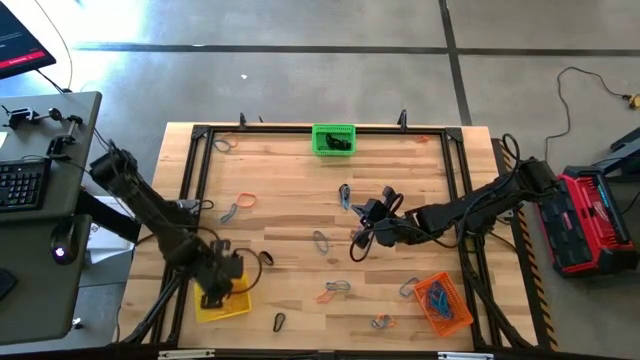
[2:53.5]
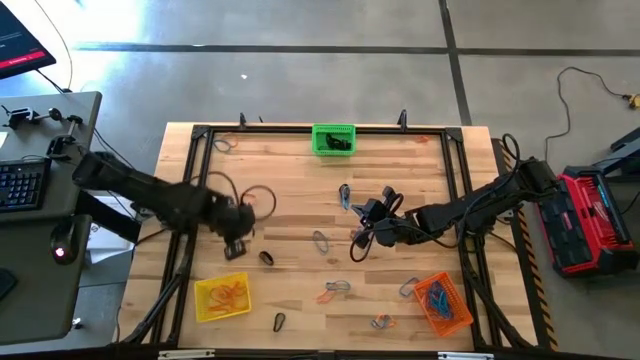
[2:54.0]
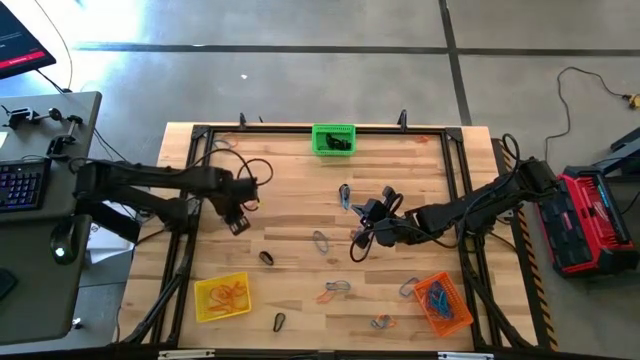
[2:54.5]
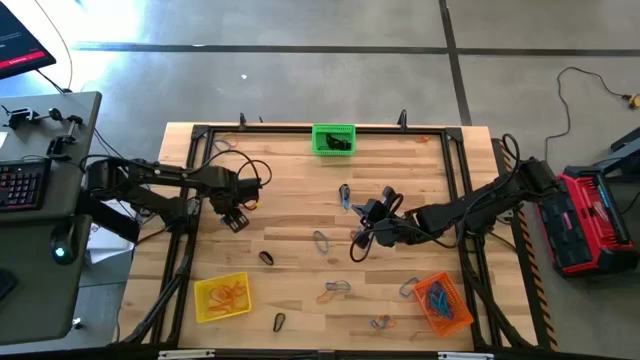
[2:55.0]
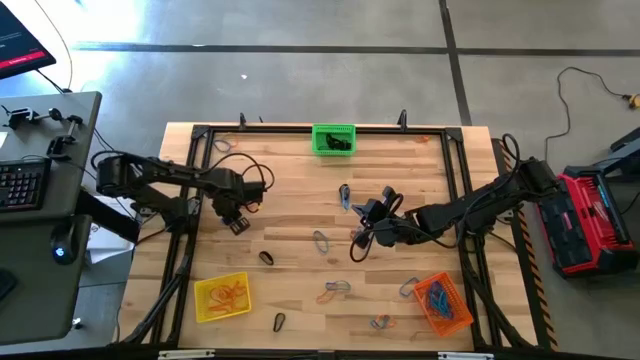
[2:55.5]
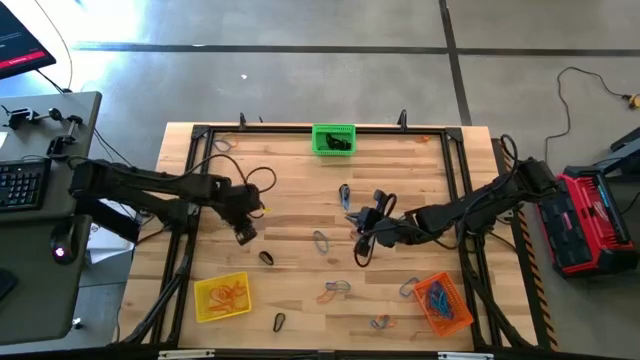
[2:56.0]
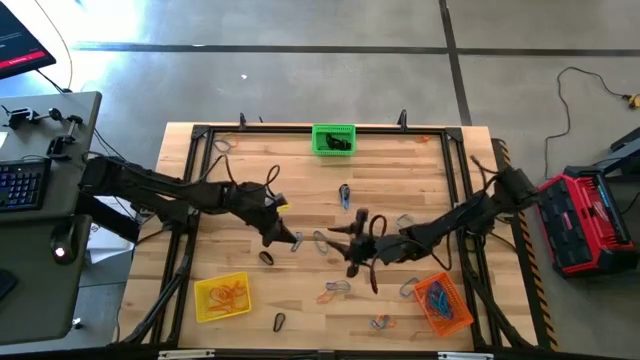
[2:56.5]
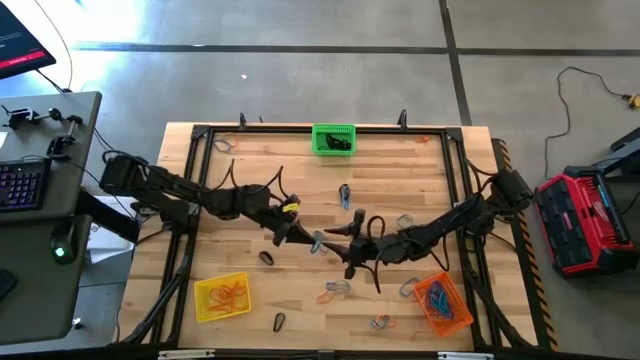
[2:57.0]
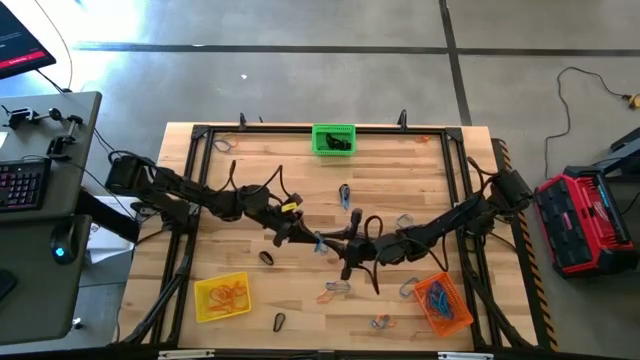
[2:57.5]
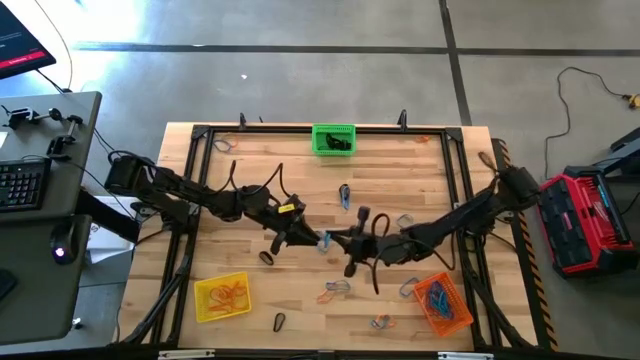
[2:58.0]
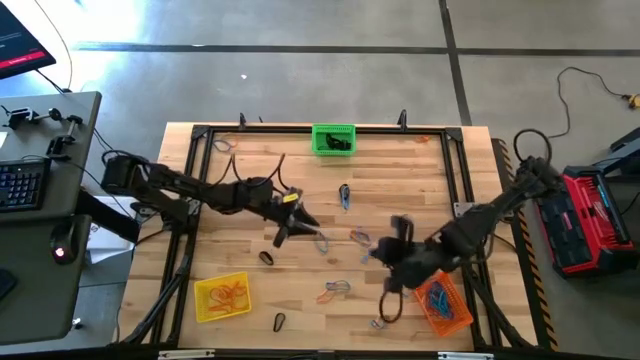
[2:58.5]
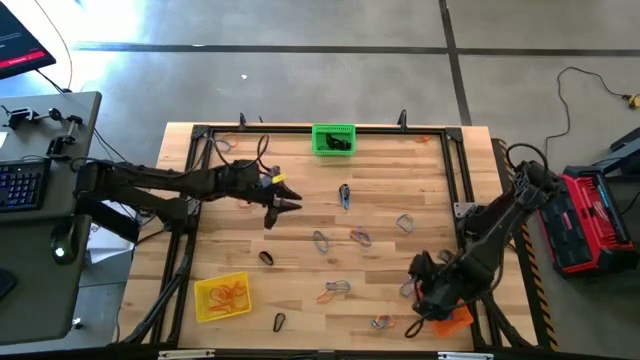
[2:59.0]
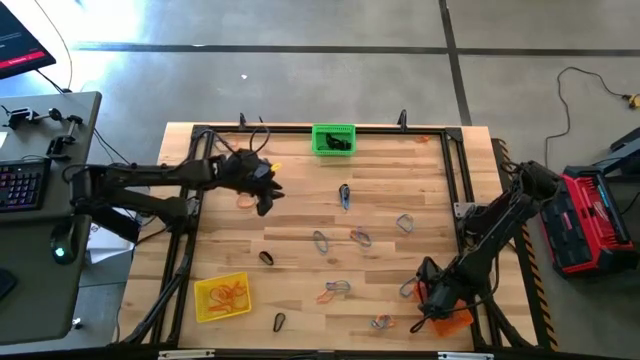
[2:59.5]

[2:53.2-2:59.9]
Task: Sort rubber bands into baskets
Put the blue rubber band into the orange bin

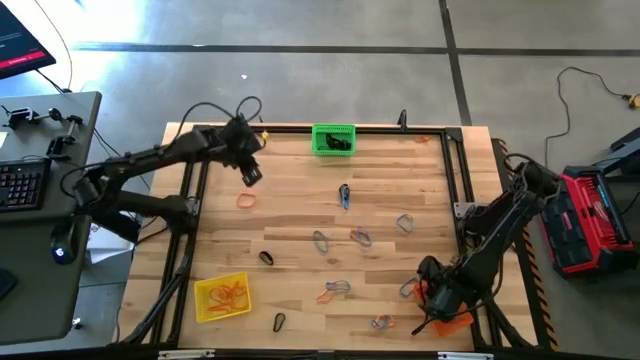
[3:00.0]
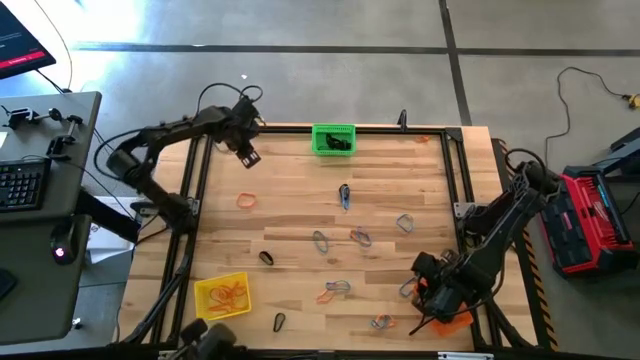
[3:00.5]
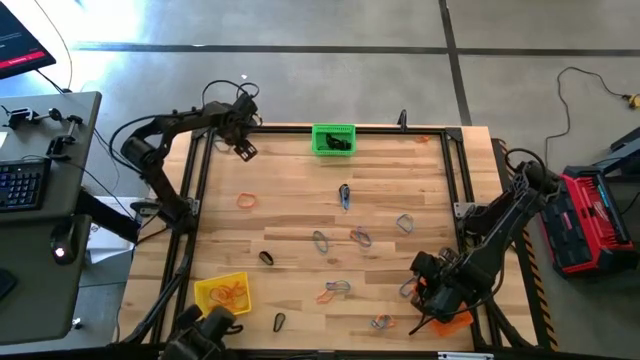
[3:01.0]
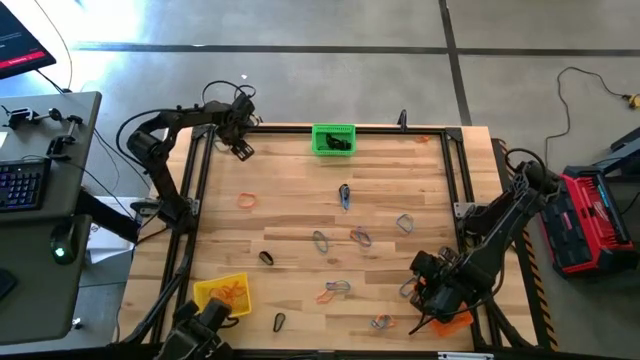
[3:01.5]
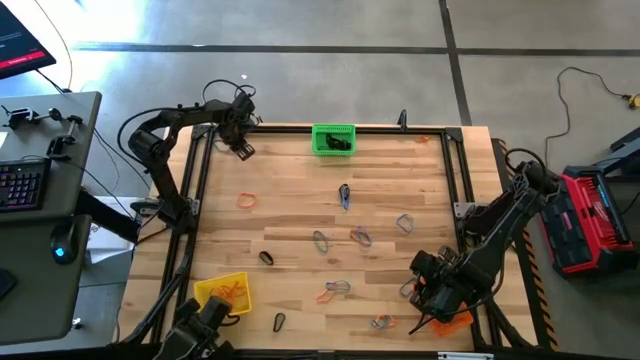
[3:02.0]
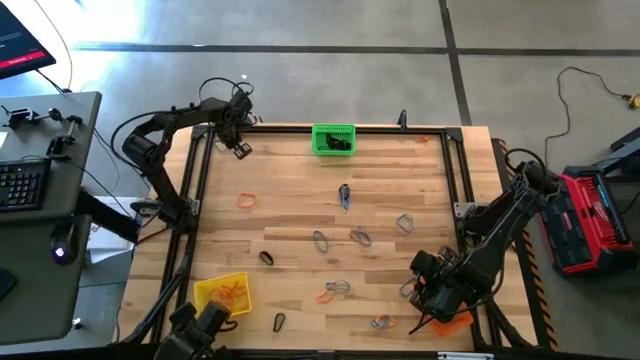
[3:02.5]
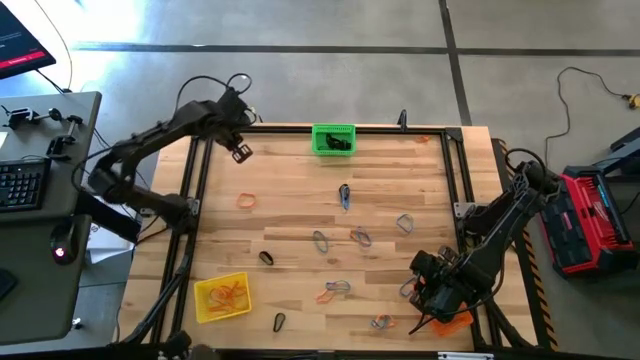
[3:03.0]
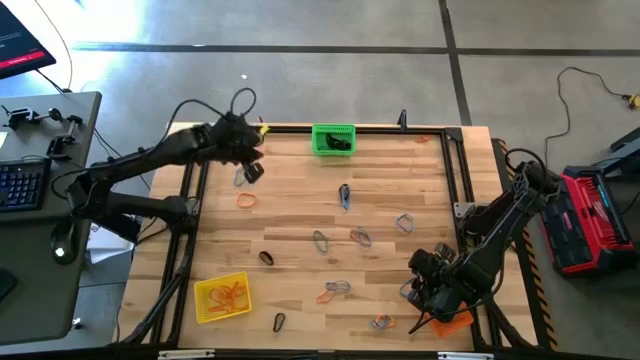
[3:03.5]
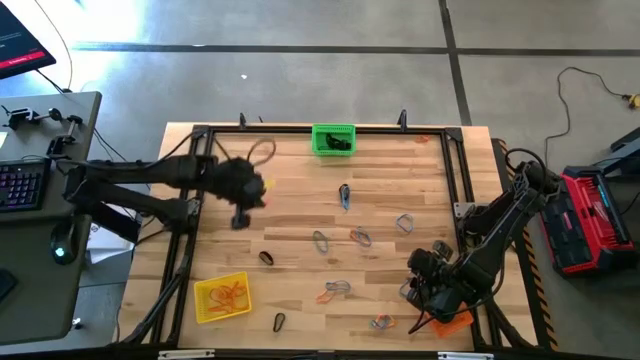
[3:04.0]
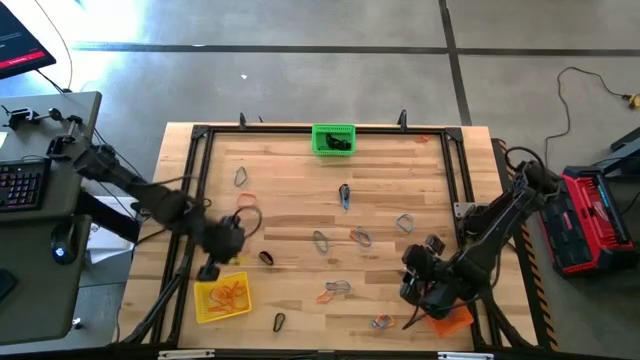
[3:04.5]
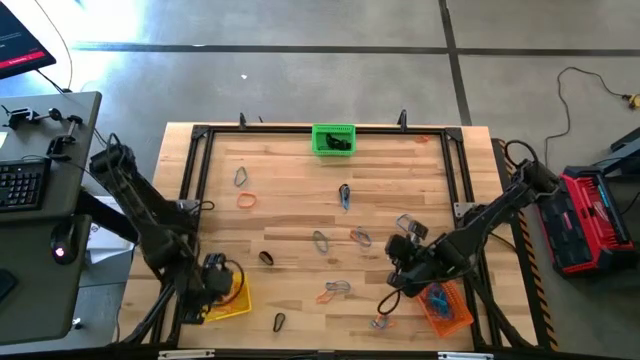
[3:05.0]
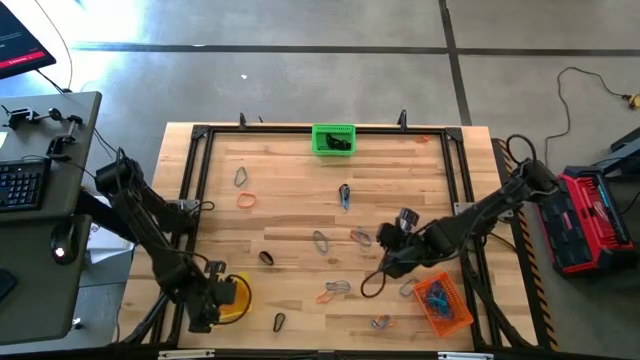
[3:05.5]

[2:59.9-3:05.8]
Put the orange rubber band into the yellow bin

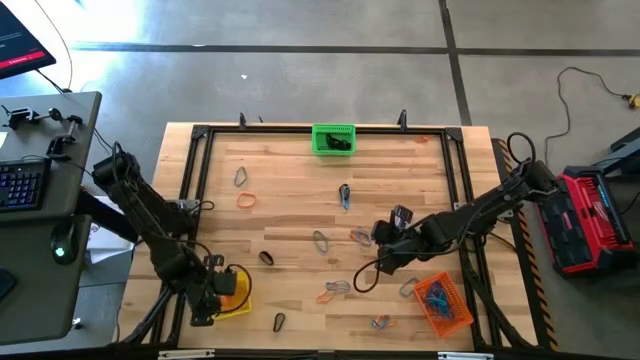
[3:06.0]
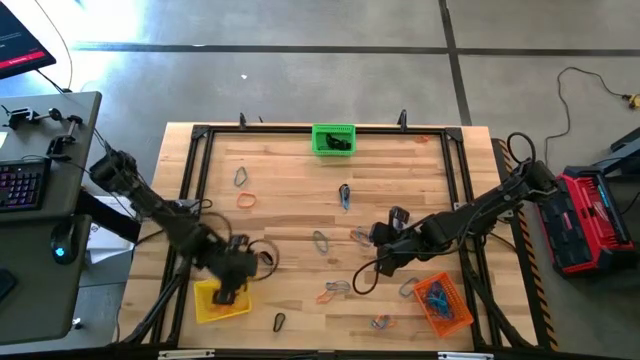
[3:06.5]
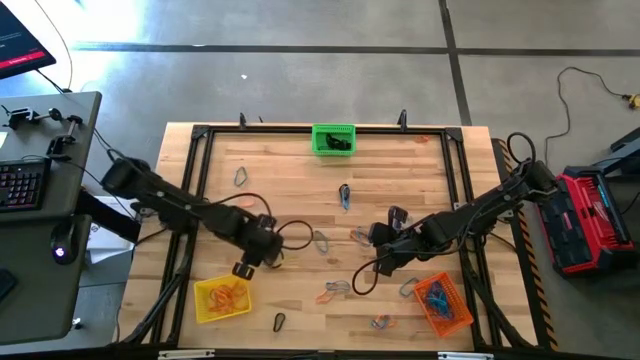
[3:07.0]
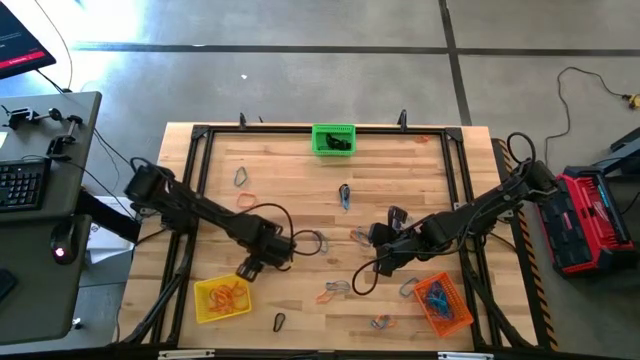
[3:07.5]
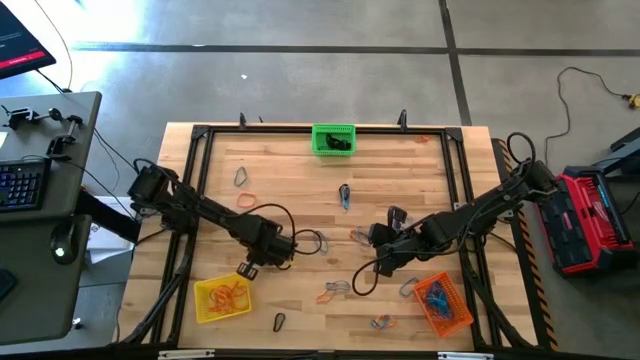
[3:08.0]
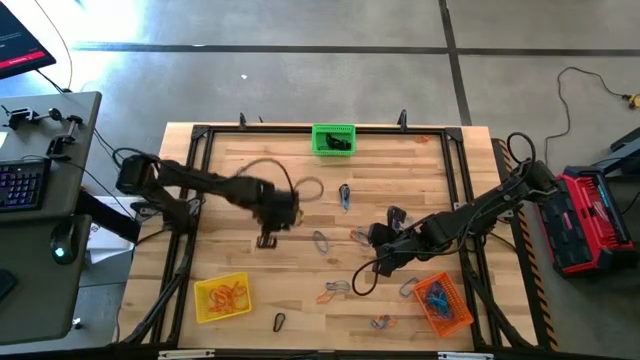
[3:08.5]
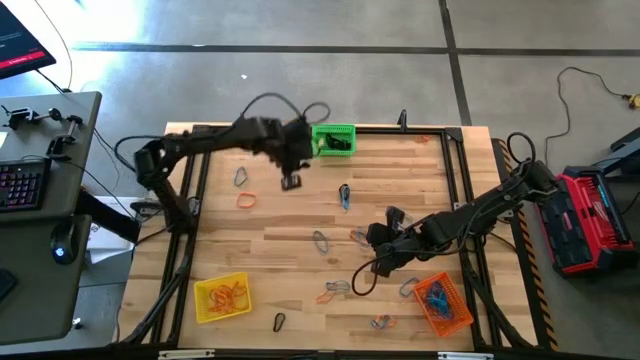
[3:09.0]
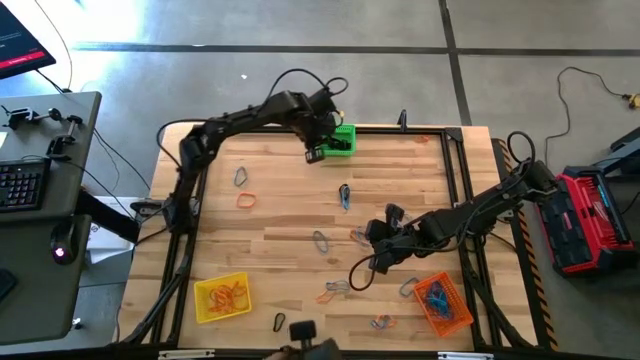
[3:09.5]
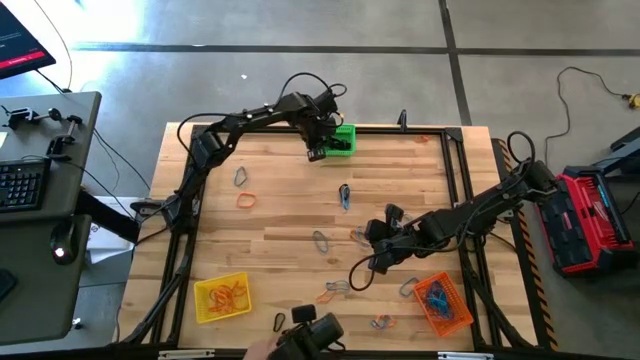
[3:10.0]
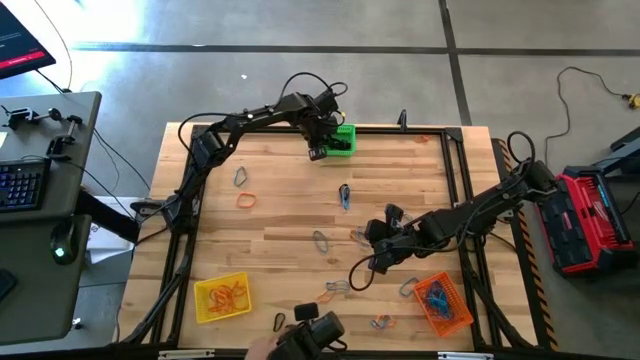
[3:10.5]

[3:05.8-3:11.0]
Put the black rubber band into the green bin

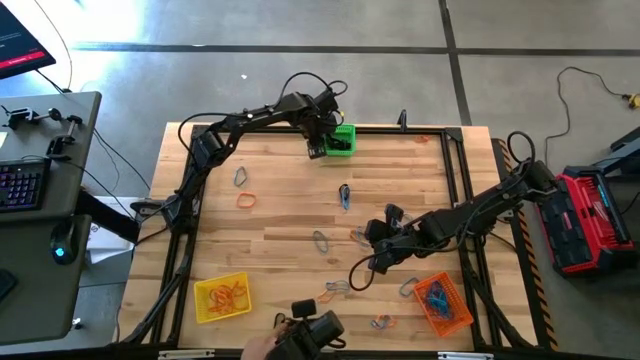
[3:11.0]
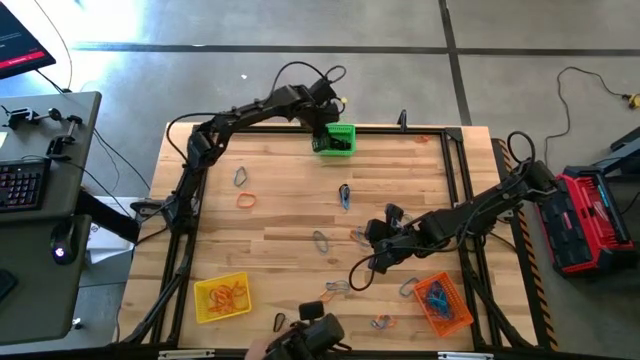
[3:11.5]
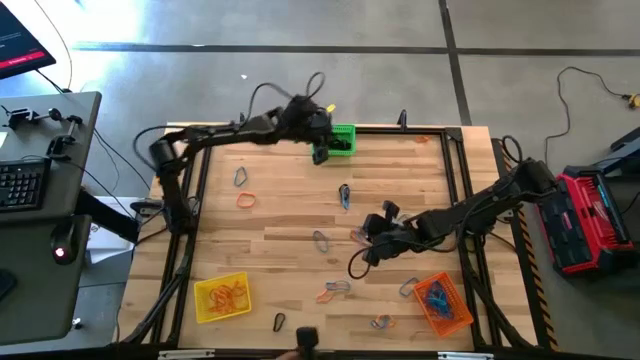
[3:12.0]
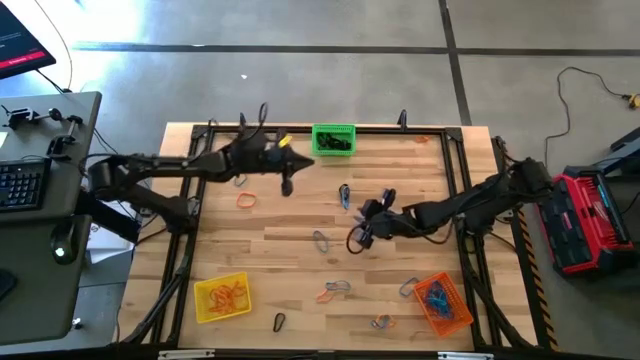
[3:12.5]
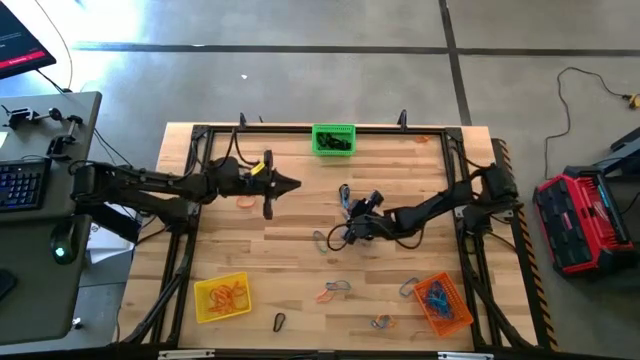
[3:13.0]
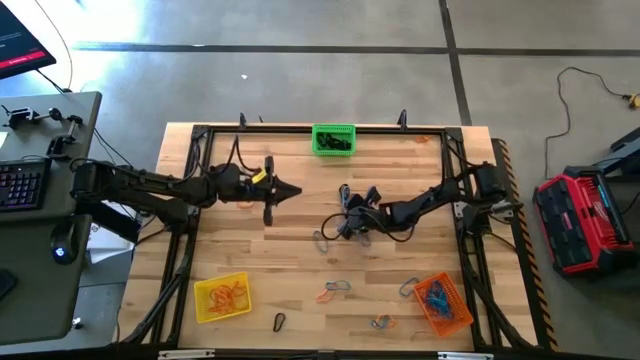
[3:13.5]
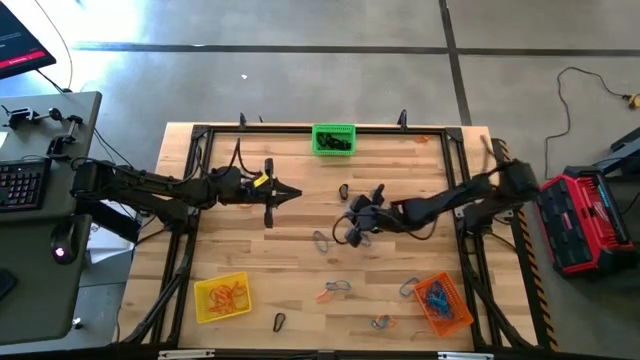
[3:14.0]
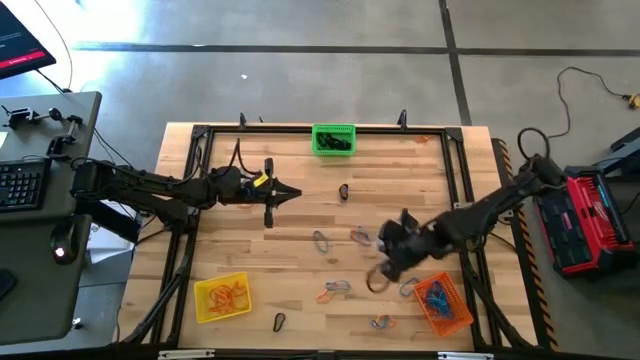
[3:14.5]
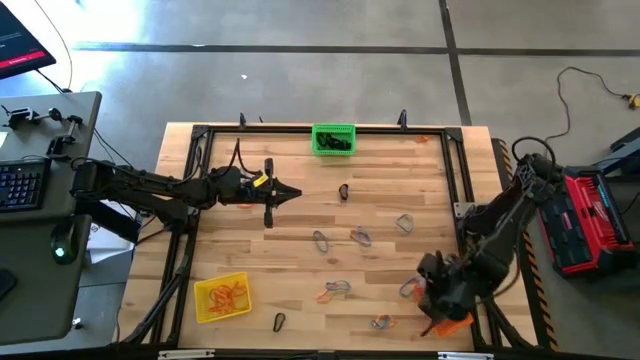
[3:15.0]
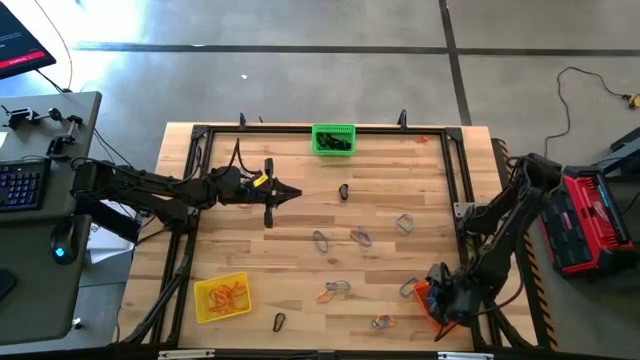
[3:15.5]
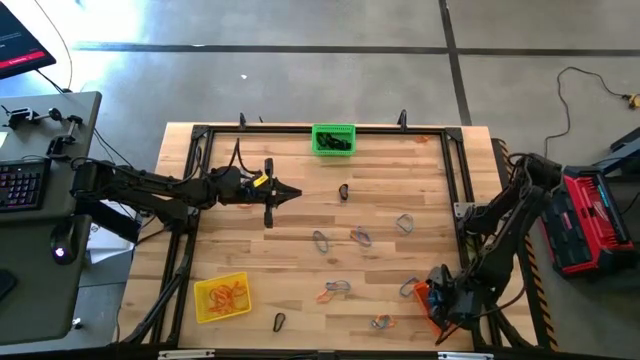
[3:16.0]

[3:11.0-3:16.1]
Put the blue rubber band into the orange bin
